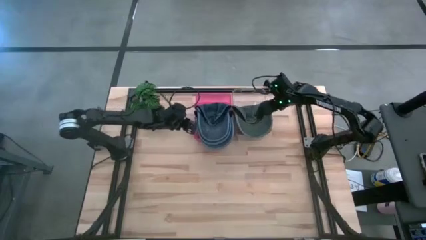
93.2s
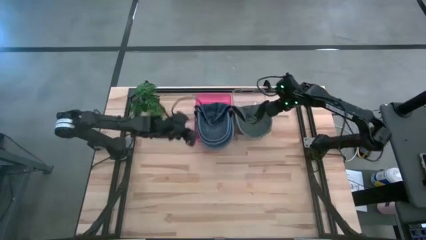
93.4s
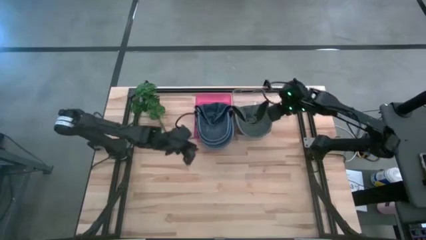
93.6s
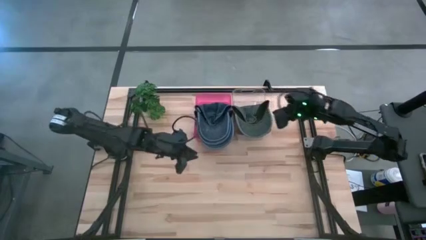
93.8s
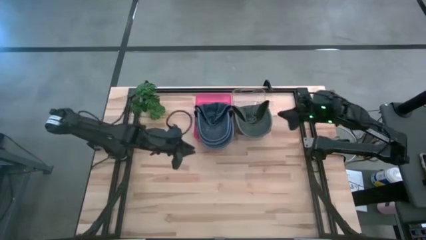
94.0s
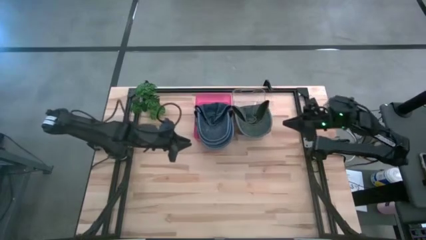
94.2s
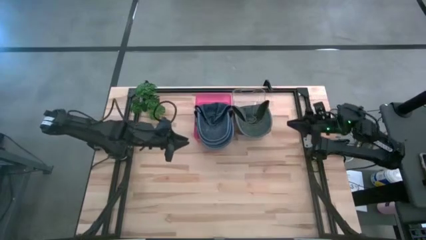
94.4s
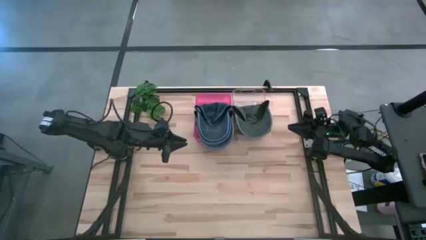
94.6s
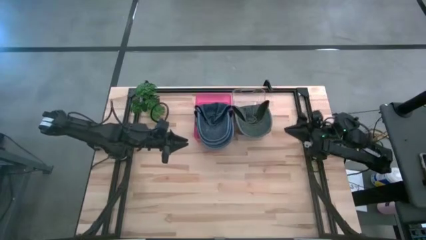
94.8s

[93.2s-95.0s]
Task: Pick & Place hat
Return to Home Position

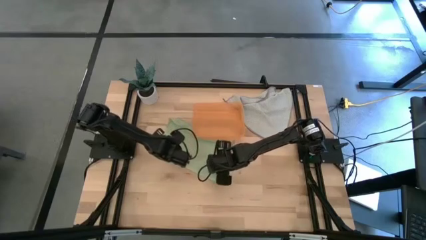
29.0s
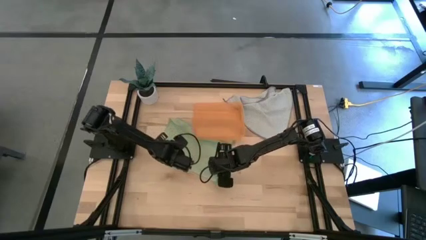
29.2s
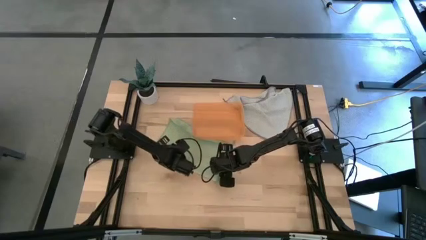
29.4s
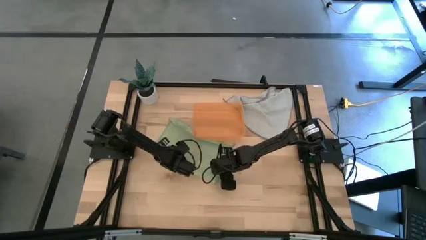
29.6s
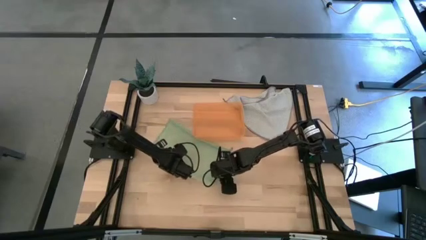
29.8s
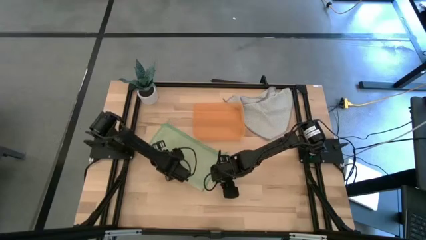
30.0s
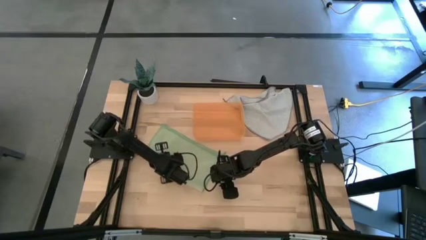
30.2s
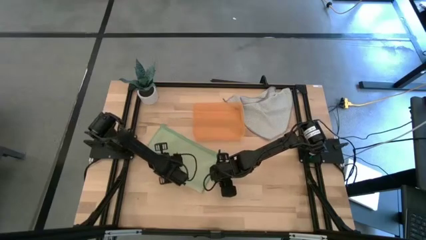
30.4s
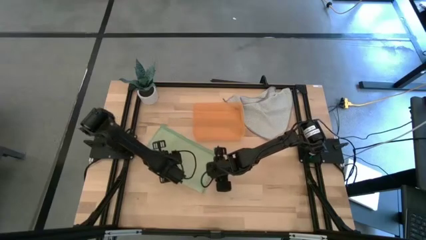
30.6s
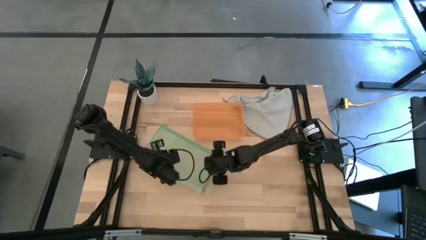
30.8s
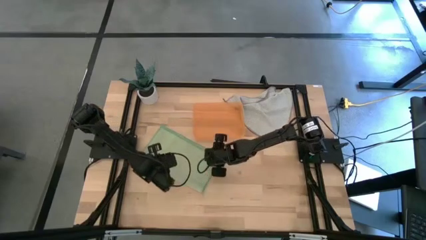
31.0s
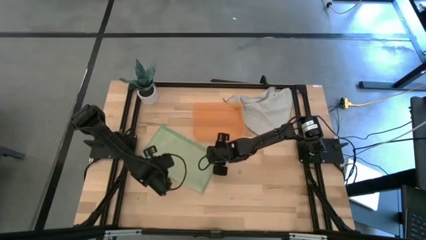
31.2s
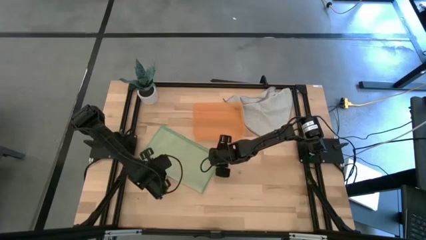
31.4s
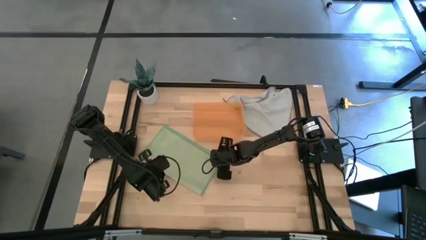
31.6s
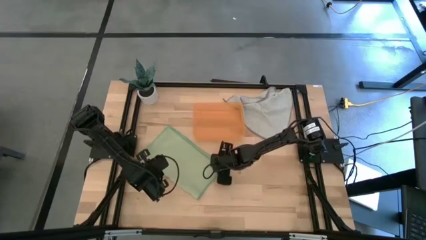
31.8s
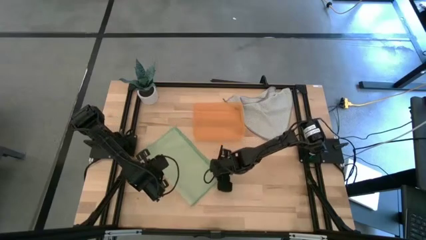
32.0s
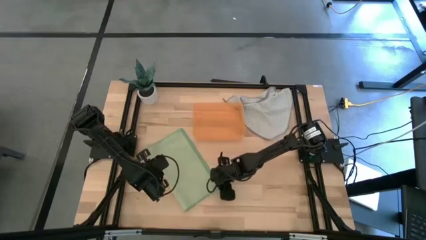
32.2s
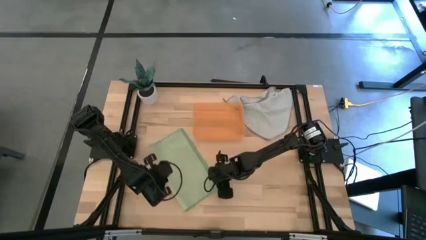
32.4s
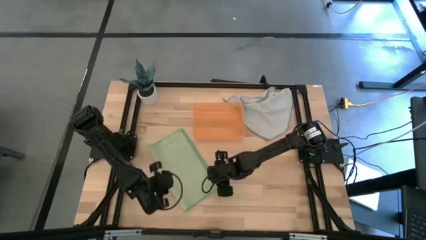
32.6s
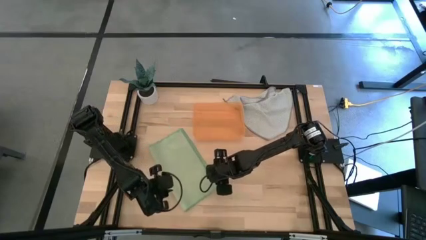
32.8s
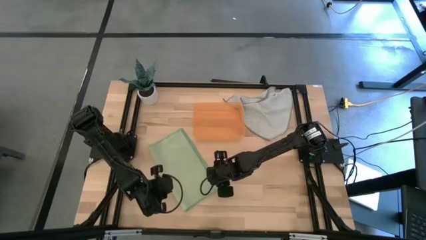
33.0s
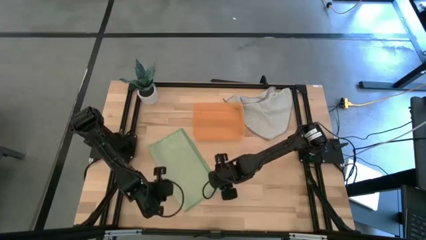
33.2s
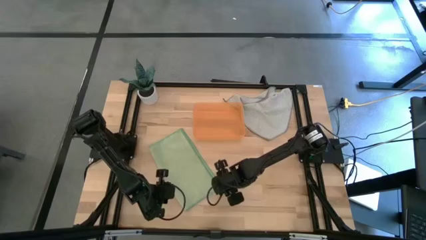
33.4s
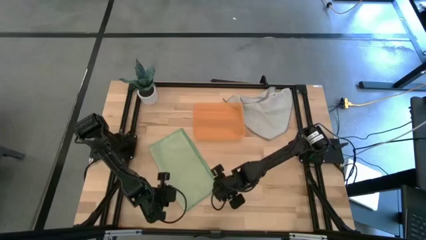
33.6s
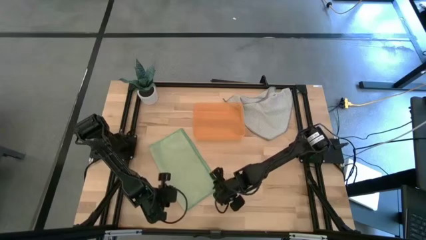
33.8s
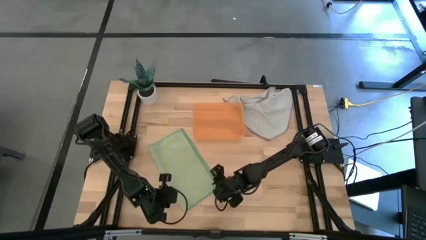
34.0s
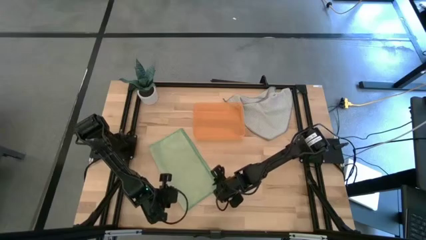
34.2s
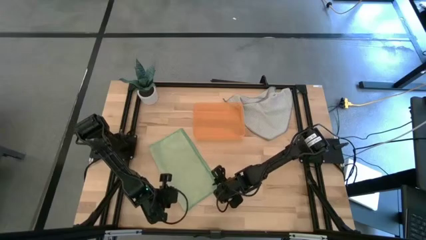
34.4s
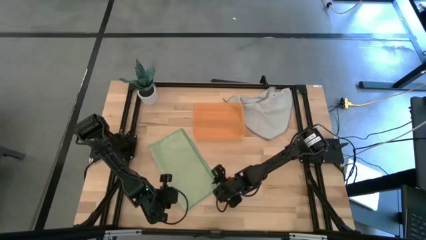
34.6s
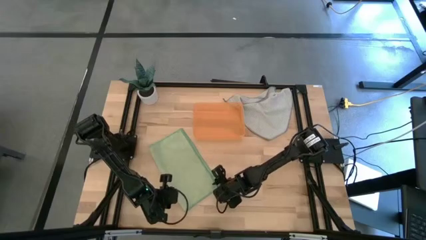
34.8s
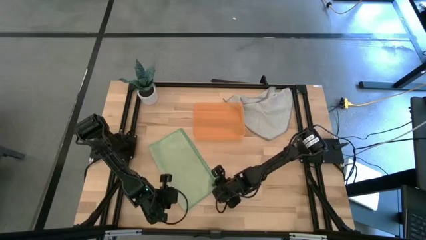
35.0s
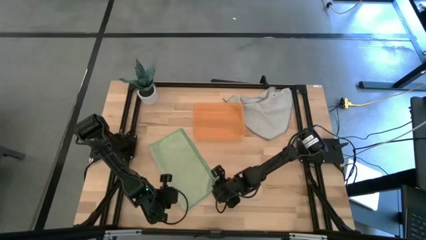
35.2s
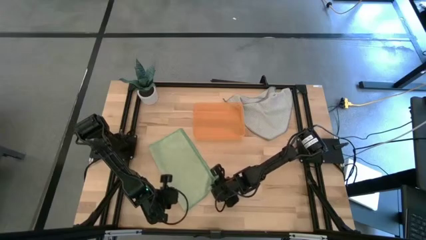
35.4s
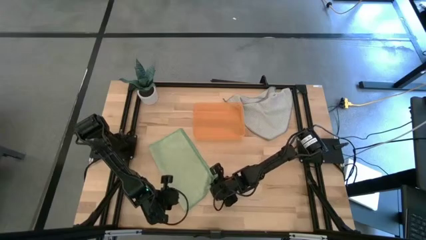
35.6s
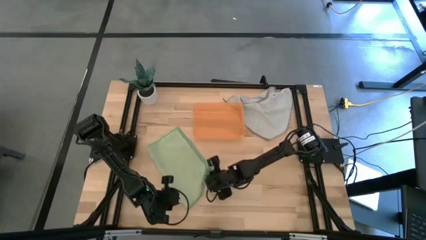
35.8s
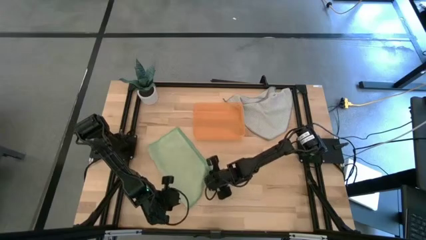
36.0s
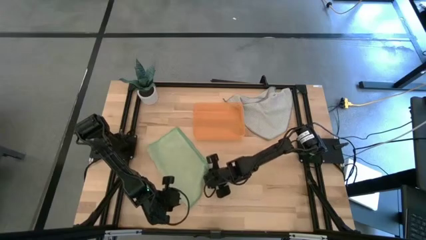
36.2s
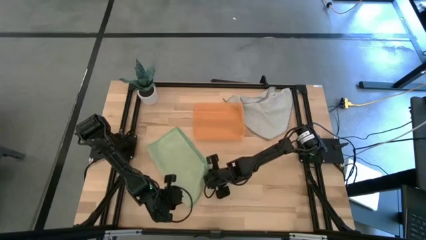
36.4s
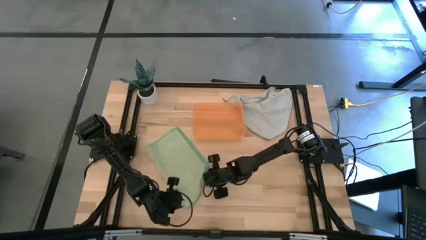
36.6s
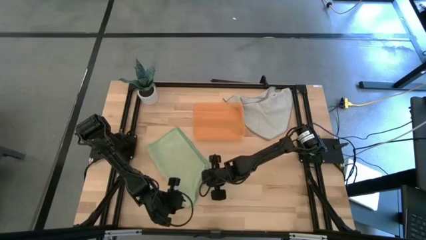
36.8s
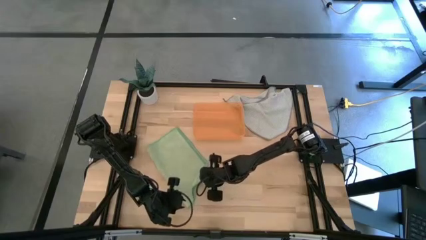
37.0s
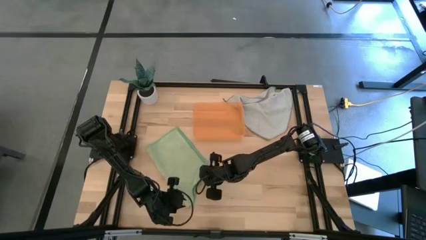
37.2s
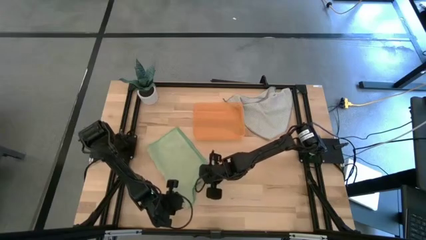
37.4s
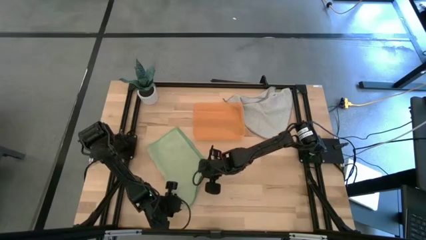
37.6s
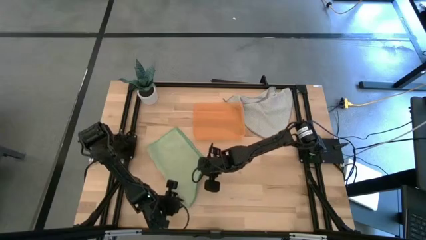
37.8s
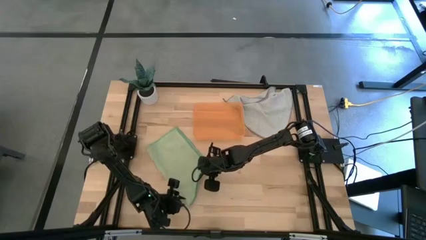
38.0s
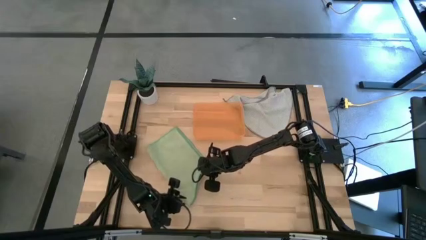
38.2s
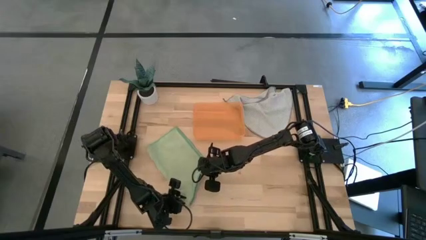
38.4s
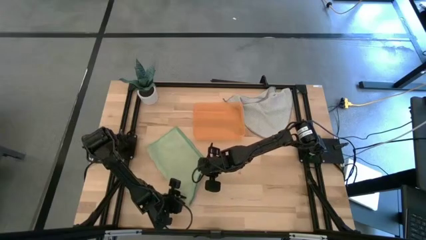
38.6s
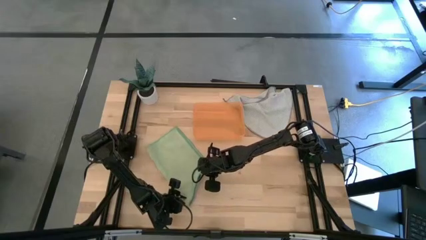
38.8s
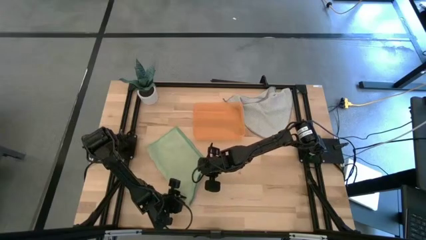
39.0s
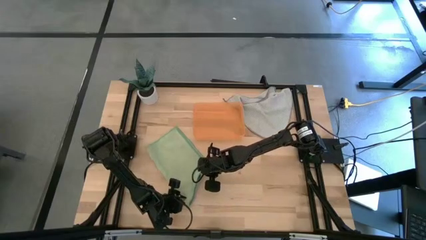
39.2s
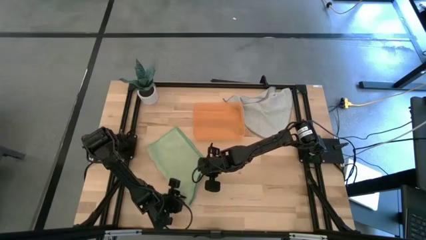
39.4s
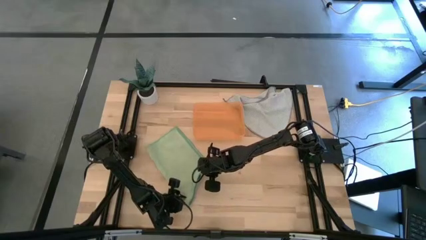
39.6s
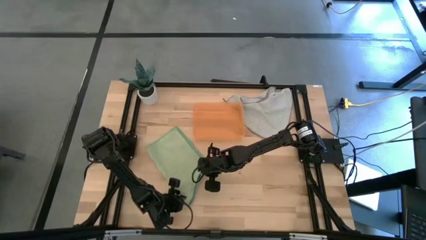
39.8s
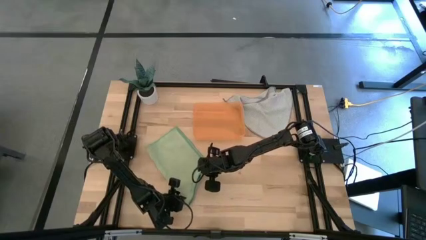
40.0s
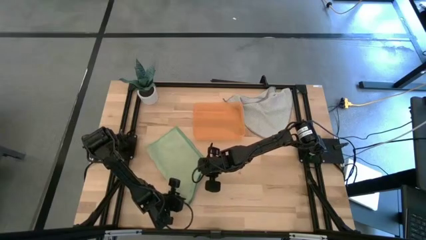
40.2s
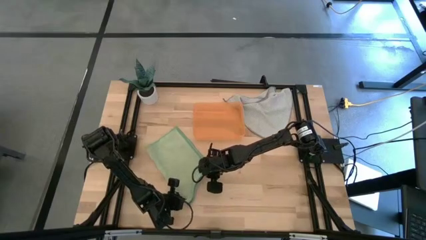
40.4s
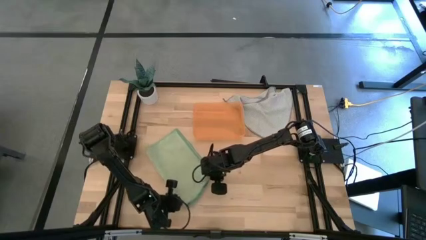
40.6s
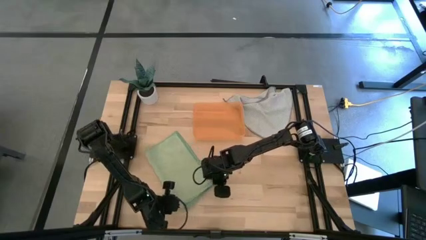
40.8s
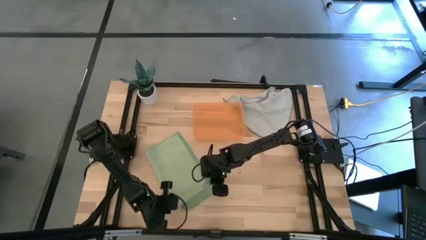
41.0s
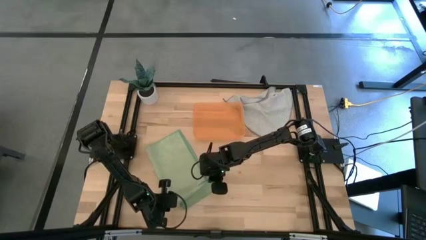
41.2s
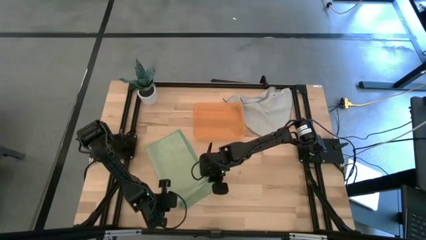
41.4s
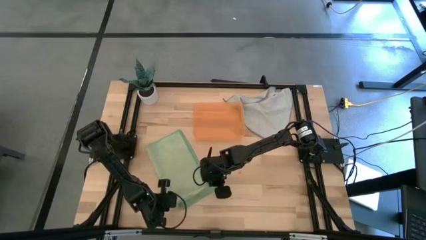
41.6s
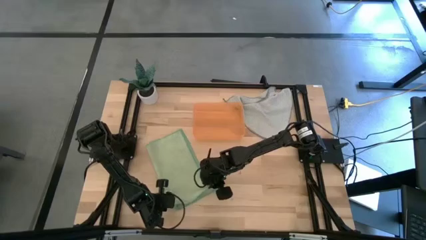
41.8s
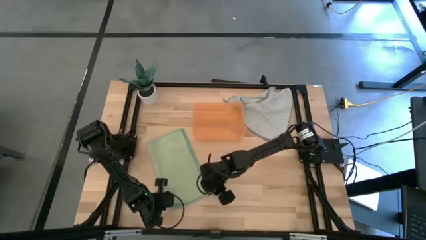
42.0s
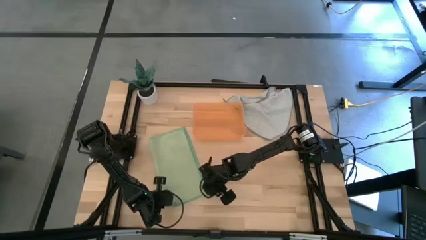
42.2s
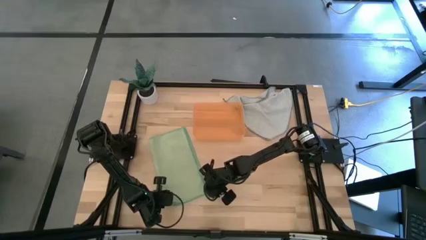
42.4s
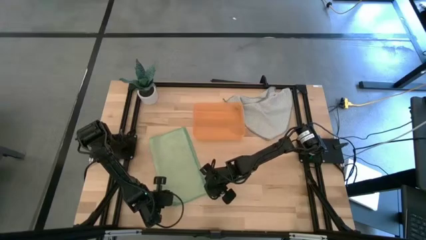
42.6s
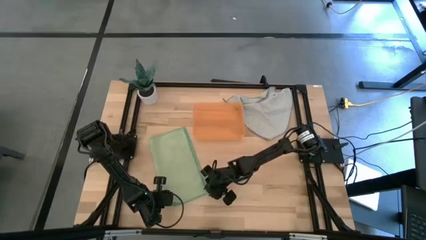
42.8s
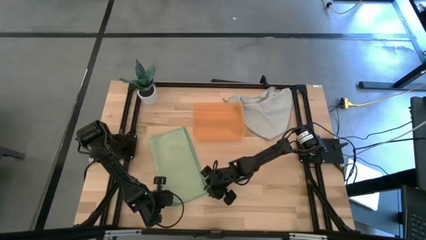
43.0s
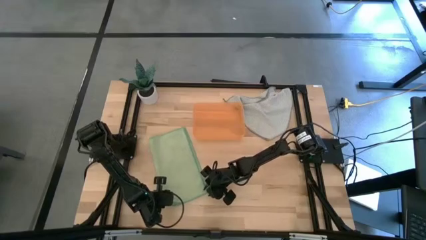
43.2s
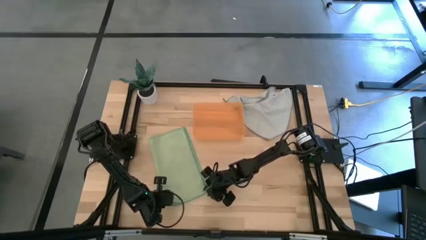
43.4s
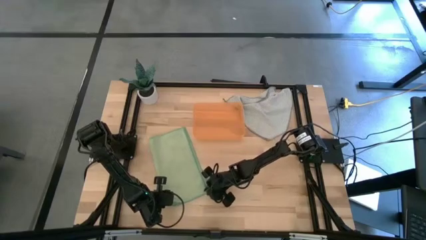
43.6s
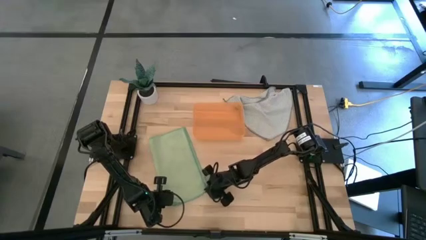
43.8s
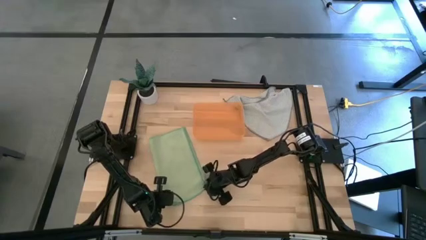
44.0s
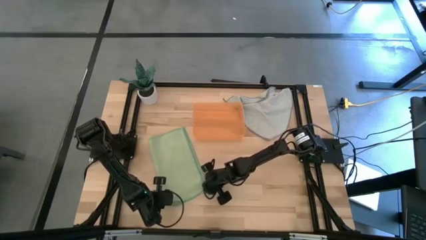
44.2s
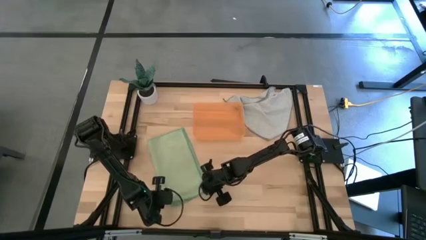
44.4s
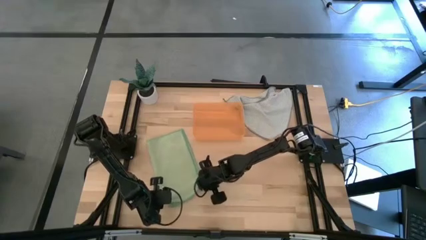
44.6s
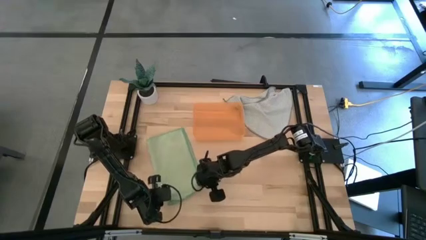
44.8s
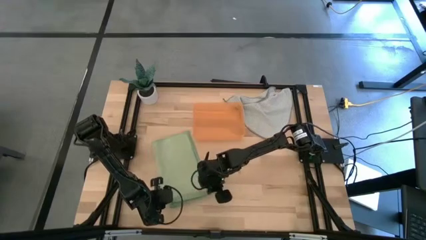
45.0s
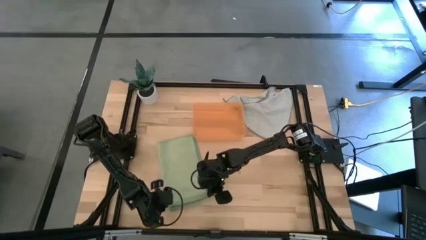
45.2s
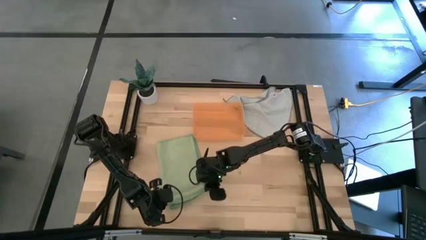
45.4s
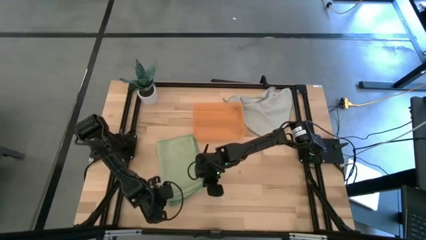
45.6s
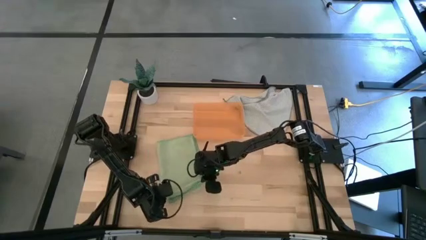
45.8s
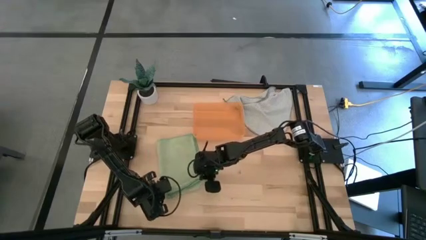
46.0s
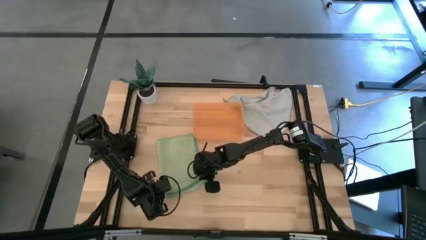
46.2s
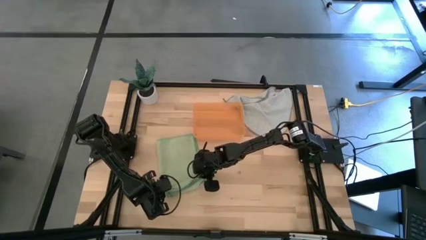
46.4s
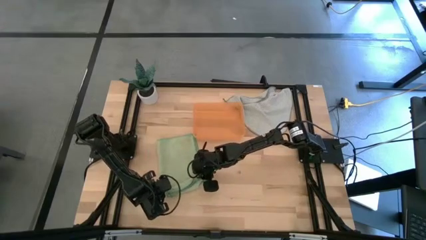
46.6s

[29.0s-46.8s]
Task: Roll microfiber towels into tight, uniform cylinder then place into a basket
Roll the green microfiber towel
